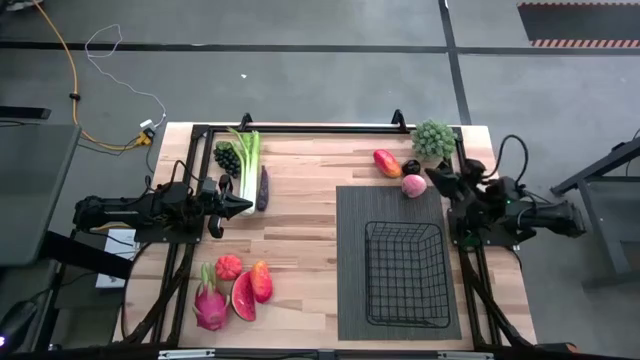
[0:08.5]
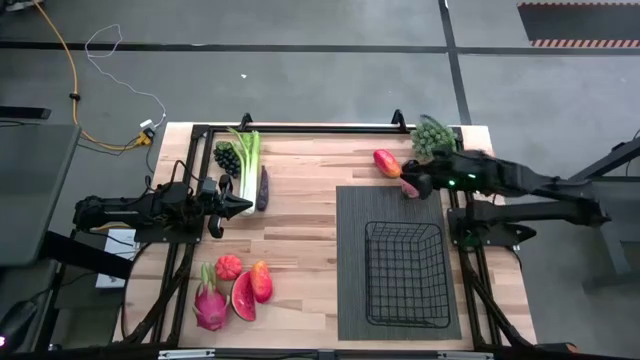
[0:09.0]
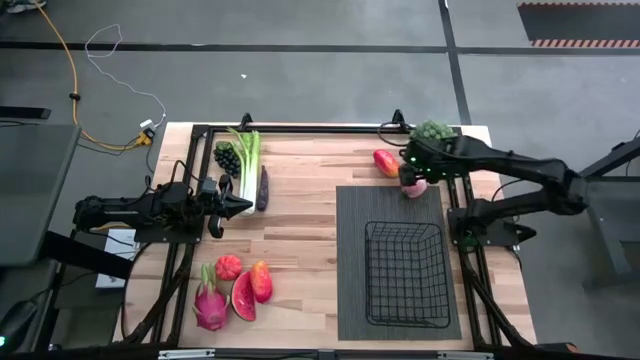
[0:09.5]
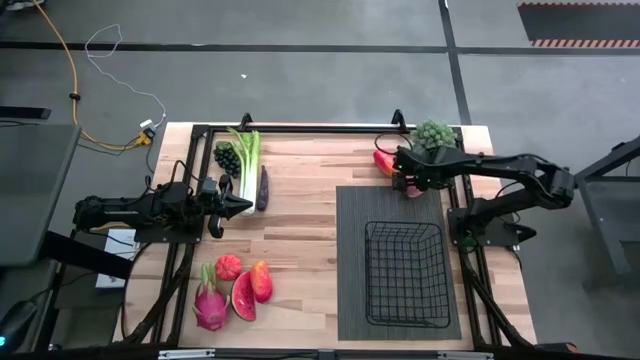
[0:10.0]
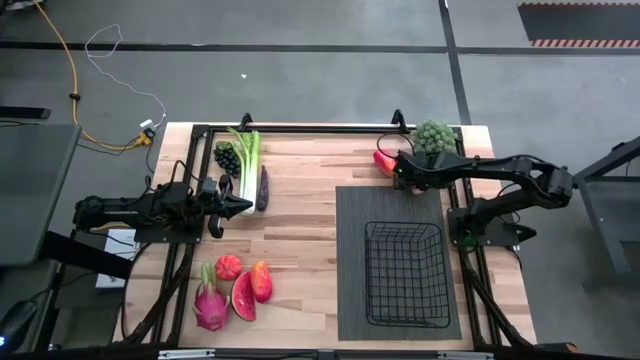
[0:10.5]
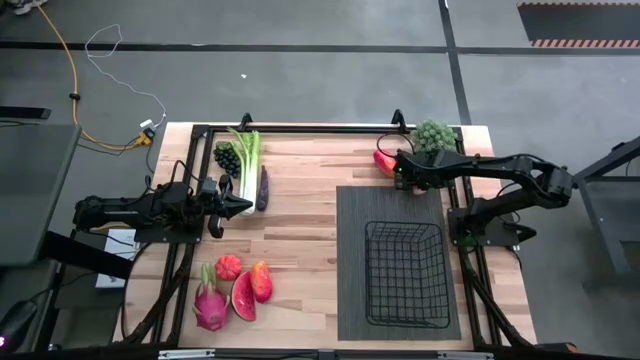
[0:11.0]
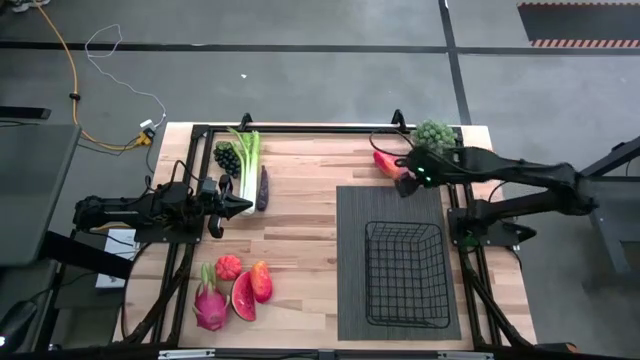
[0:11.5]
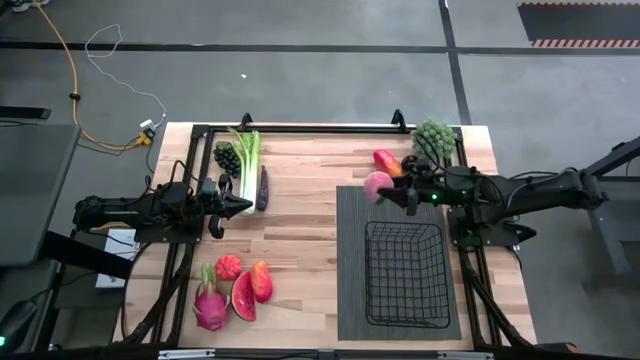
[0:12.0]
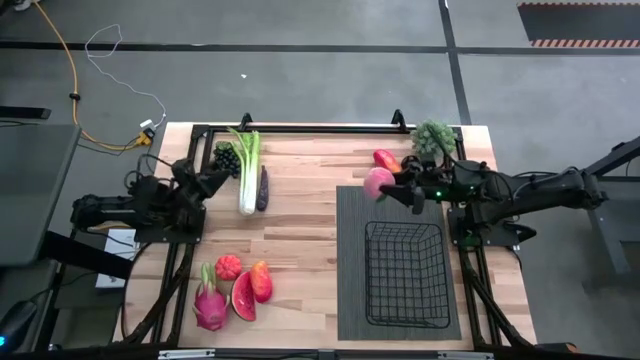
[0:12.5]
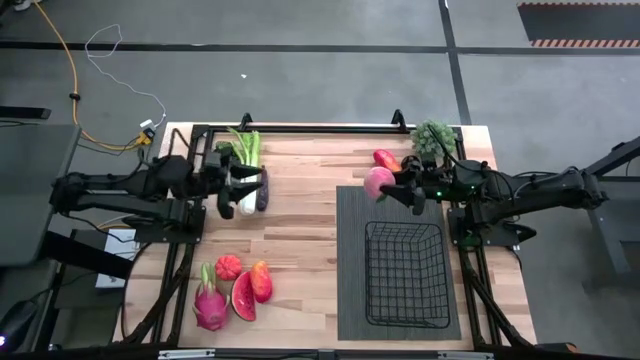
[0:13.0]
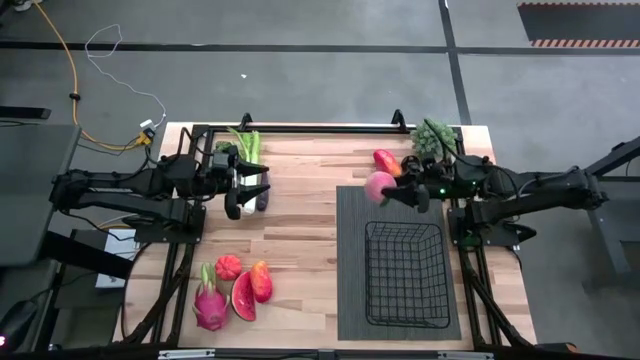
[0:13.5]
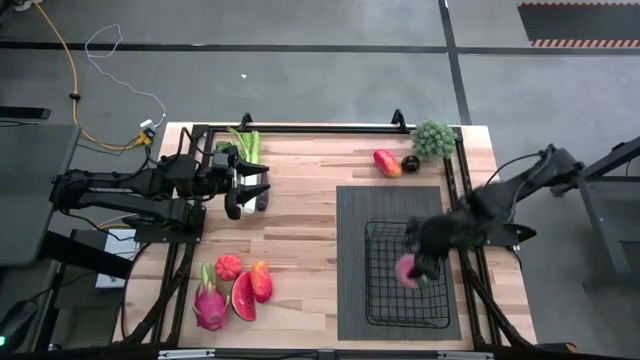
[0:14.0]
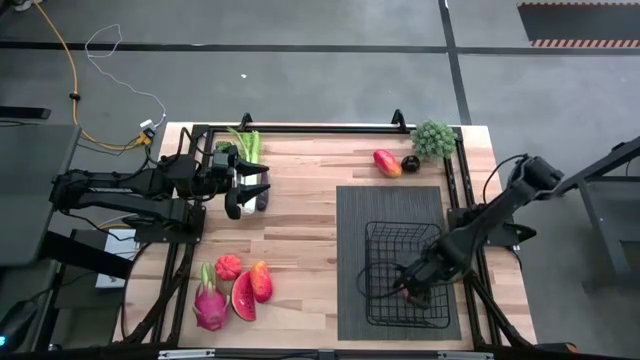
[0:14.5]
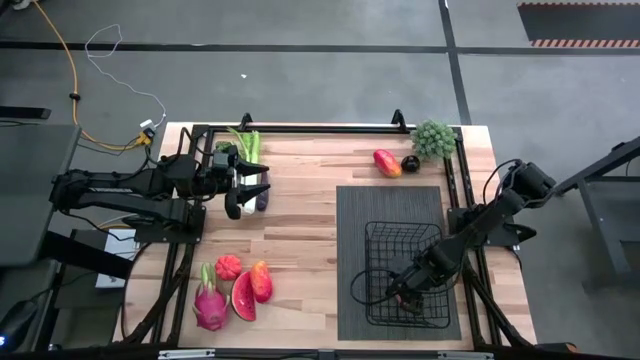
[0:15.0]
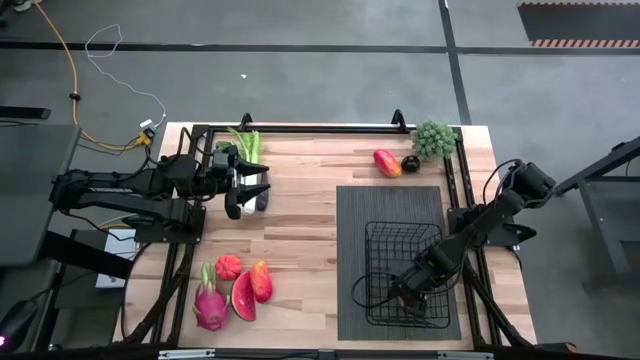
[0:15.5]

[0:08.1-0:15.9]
Task: Build produce basket
Put the apricot into the black wire basket

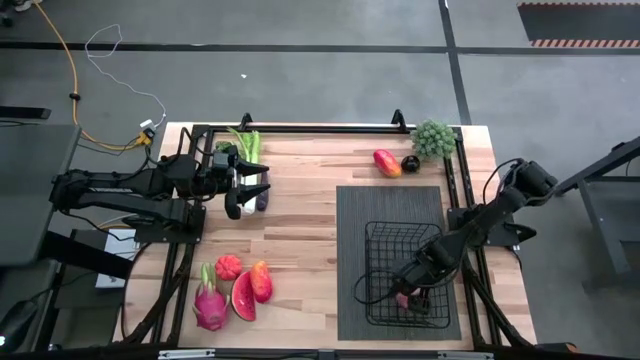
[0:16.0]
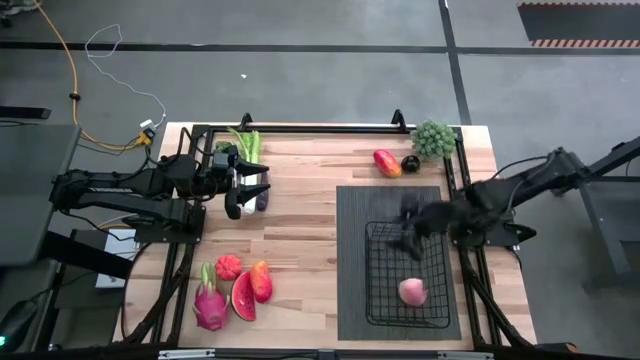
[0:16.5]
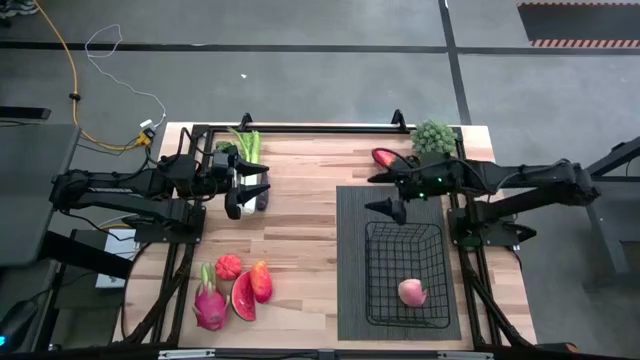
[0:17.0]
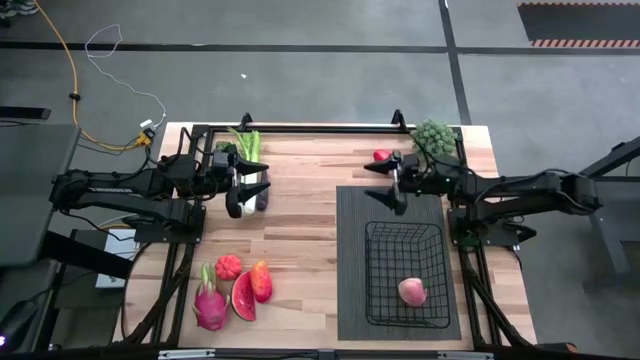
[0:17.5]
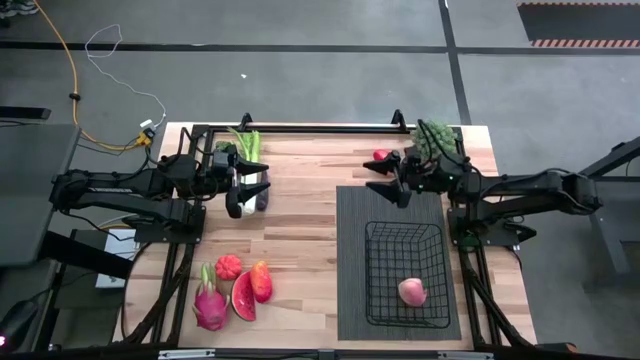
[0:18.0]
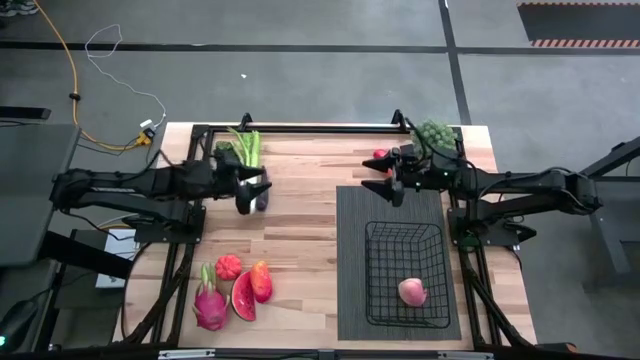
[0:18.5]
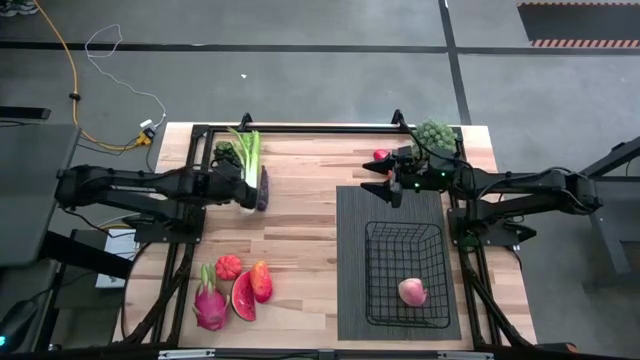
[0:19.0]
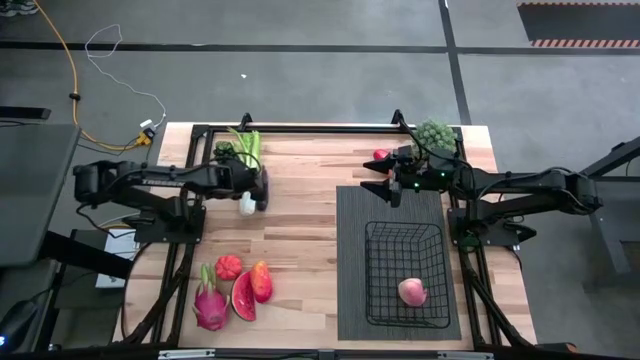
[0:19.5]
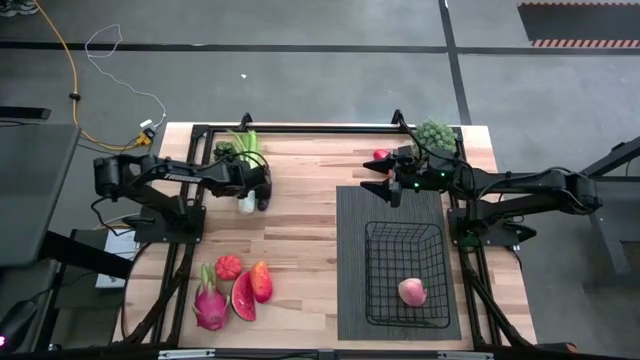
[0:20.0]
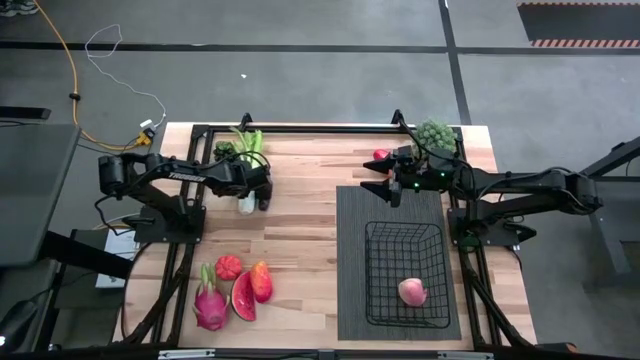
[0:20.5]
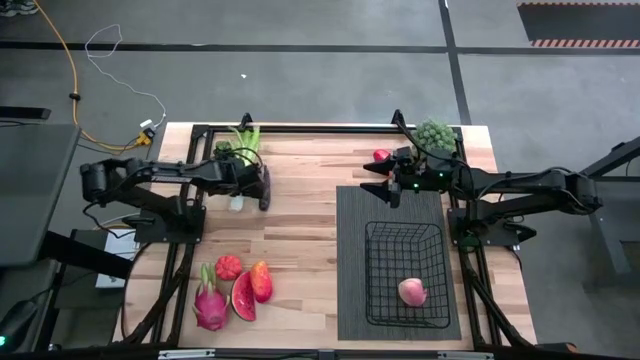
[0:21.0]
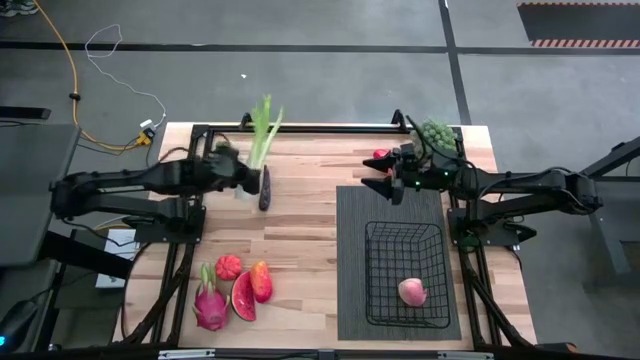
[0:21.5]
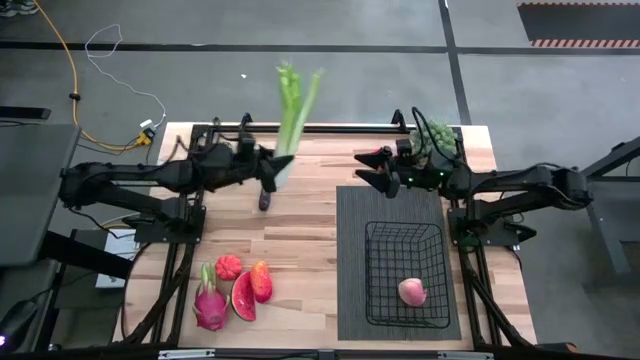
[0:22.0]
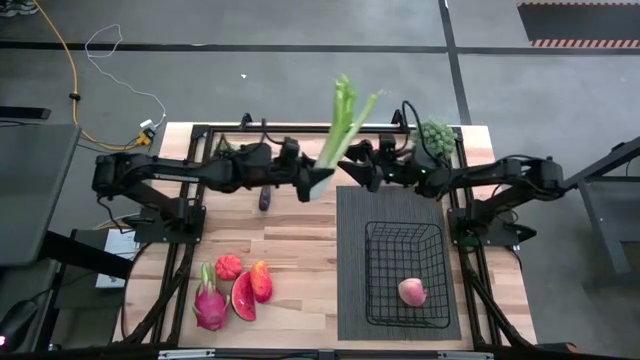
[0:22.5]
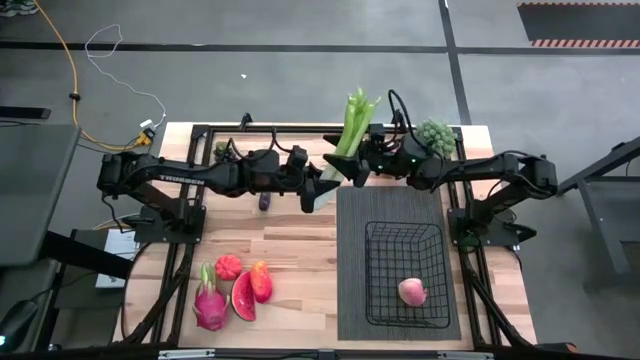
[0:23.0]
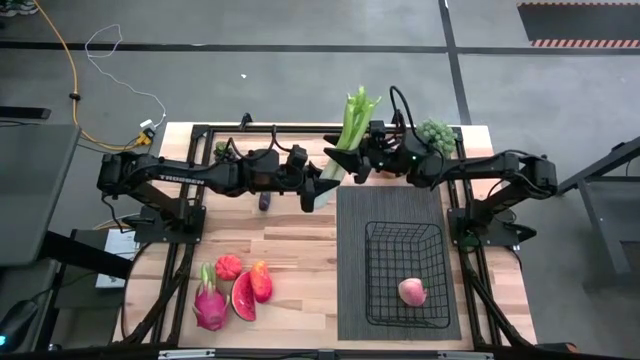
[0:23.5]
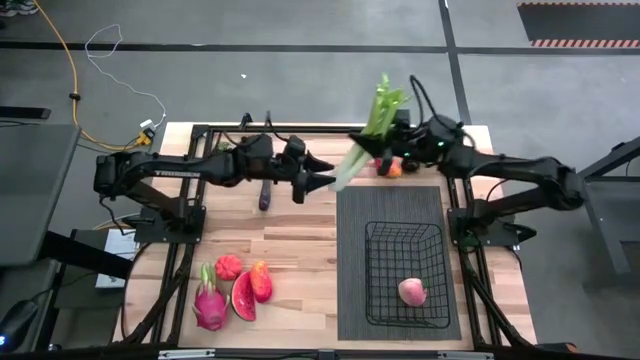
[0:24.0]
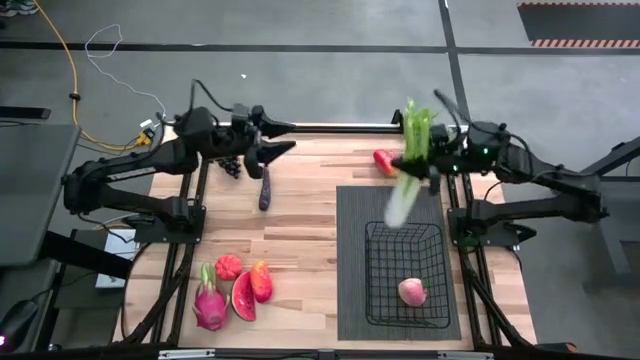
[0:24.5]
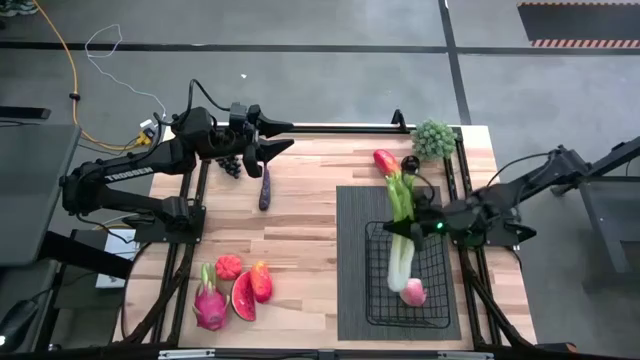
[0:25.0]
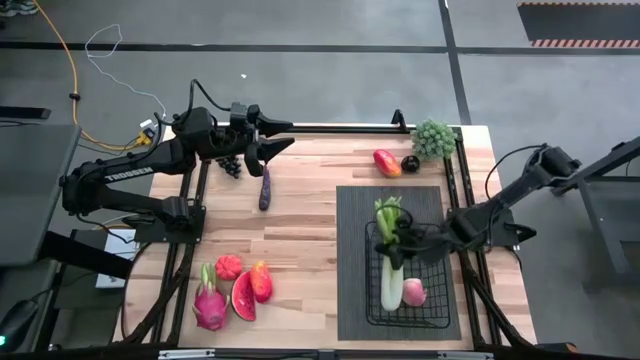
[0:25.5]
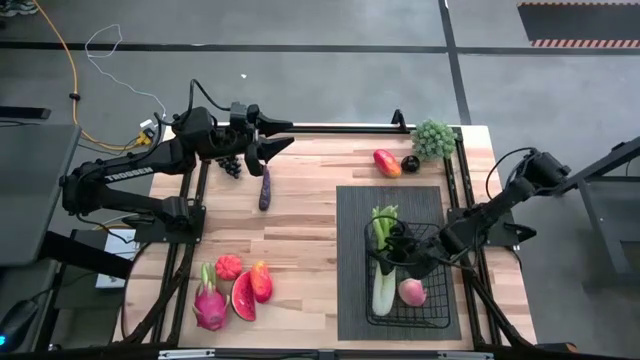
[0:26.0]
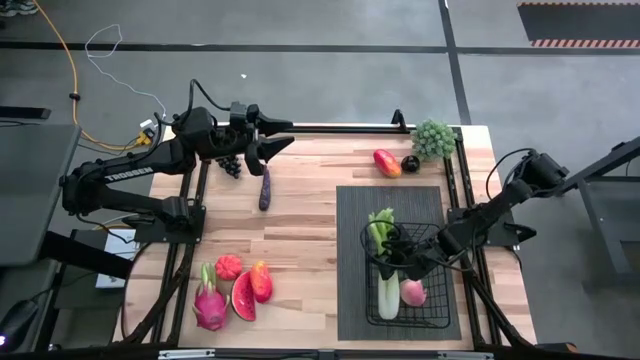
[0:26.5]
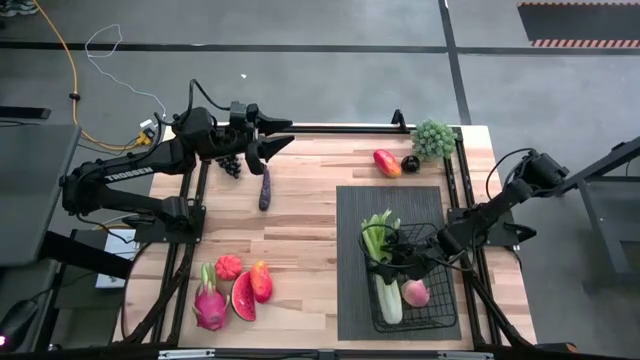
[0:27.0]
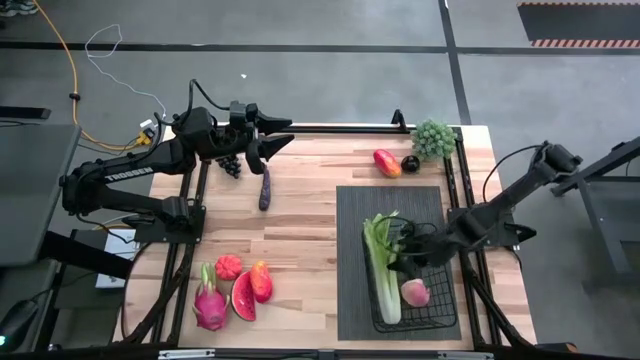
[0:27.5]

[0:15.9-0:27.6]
Put the celery into the black wire basket
